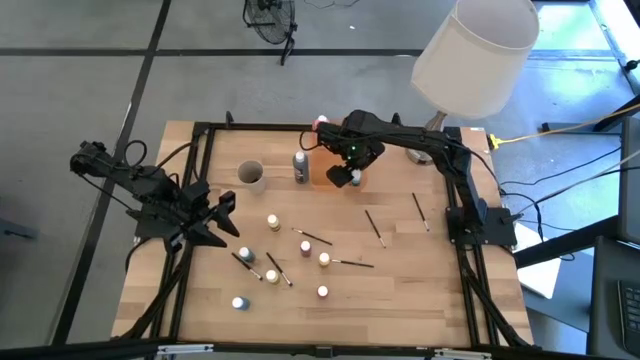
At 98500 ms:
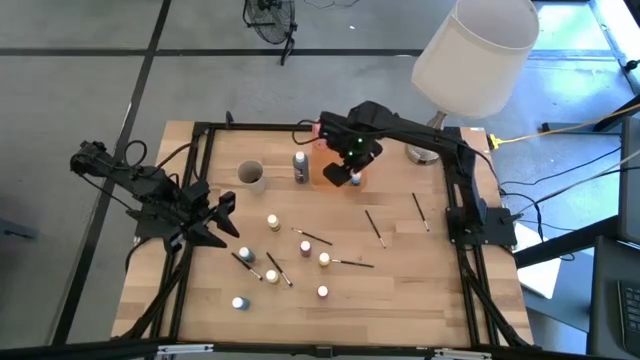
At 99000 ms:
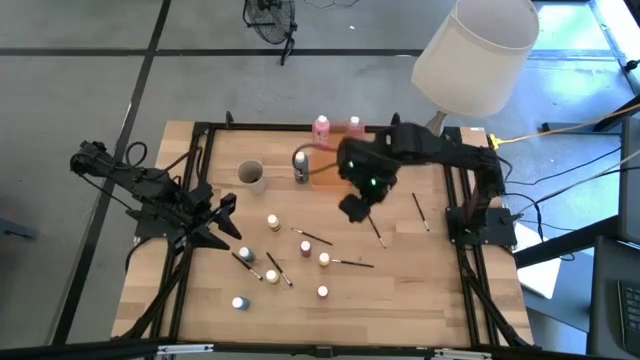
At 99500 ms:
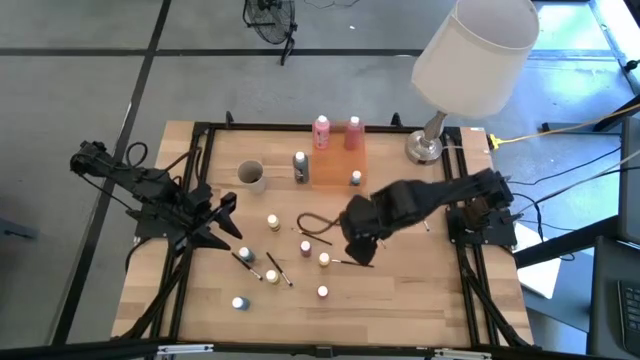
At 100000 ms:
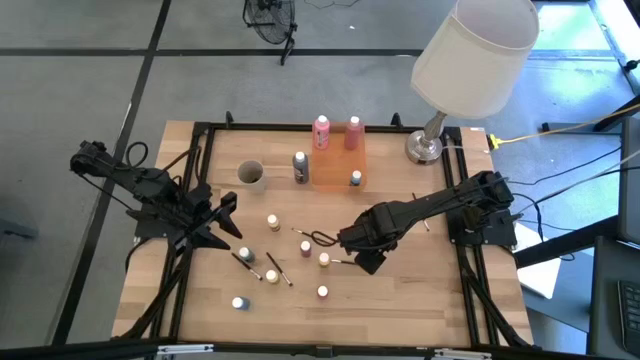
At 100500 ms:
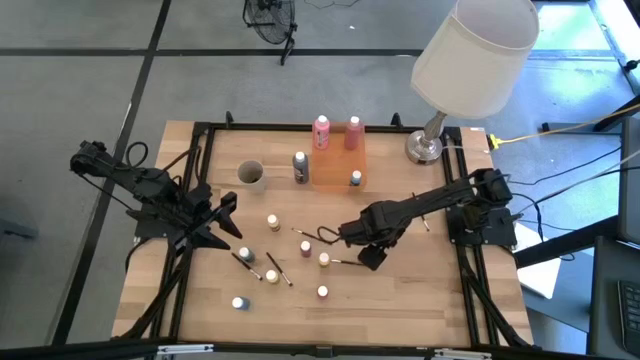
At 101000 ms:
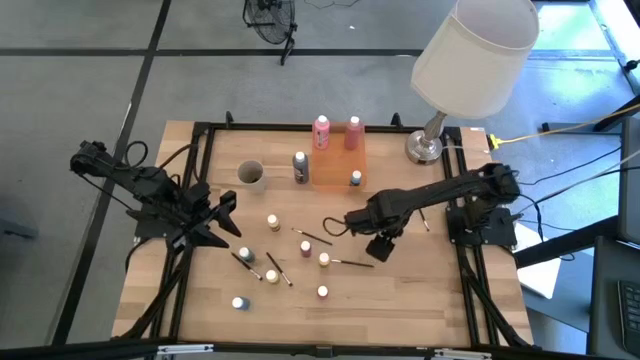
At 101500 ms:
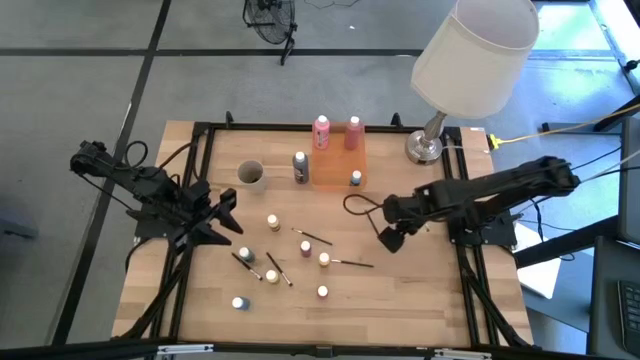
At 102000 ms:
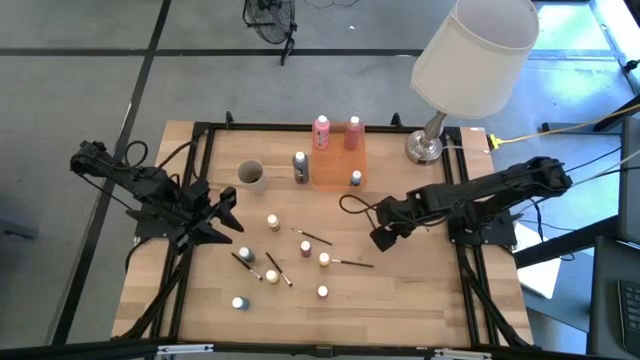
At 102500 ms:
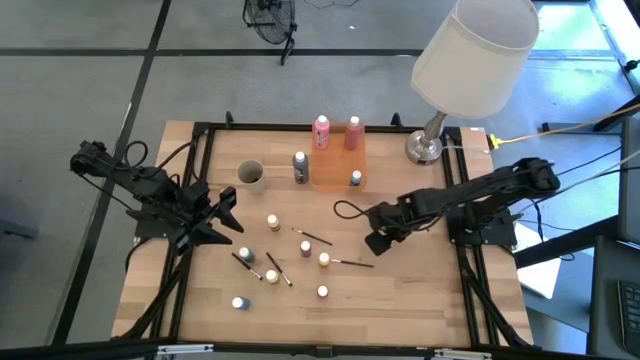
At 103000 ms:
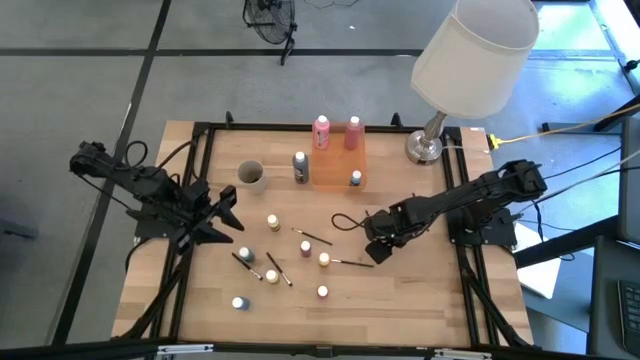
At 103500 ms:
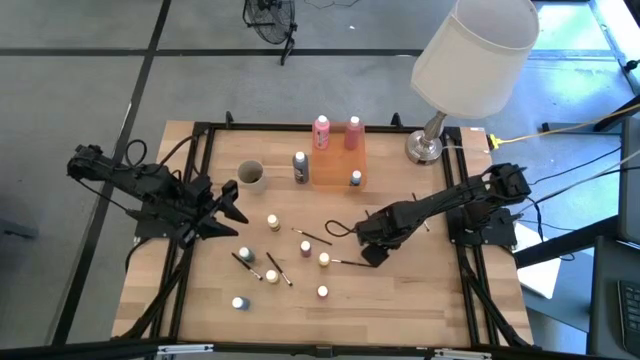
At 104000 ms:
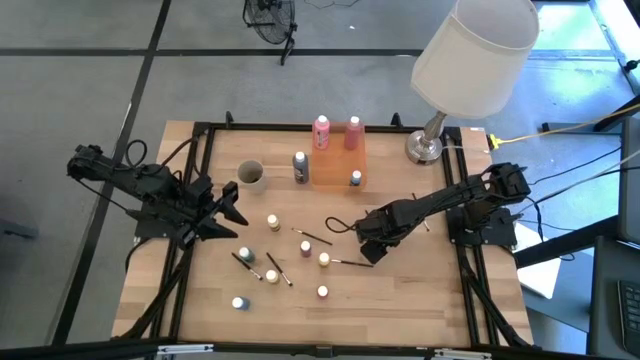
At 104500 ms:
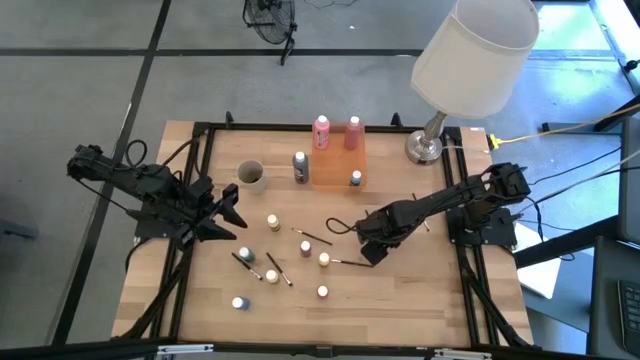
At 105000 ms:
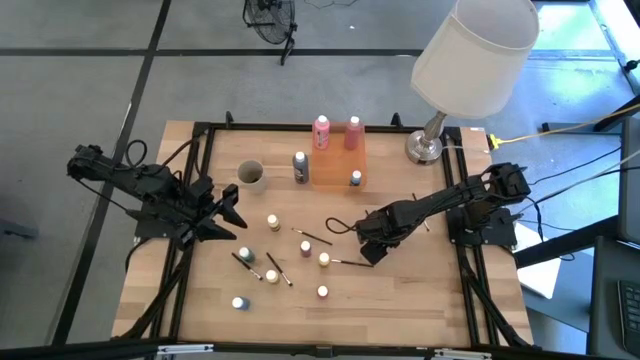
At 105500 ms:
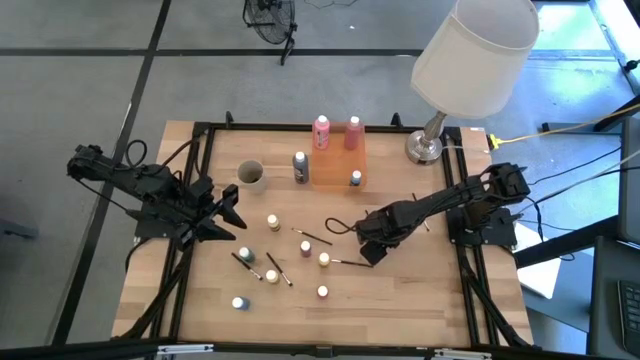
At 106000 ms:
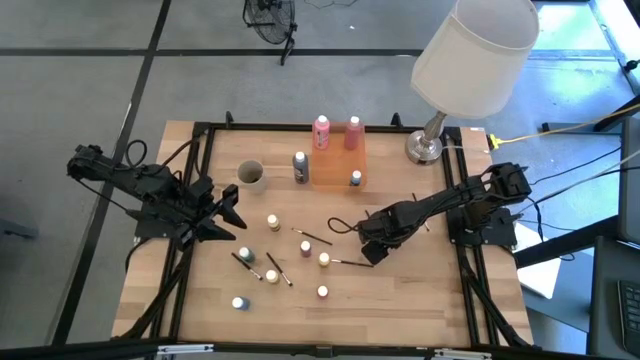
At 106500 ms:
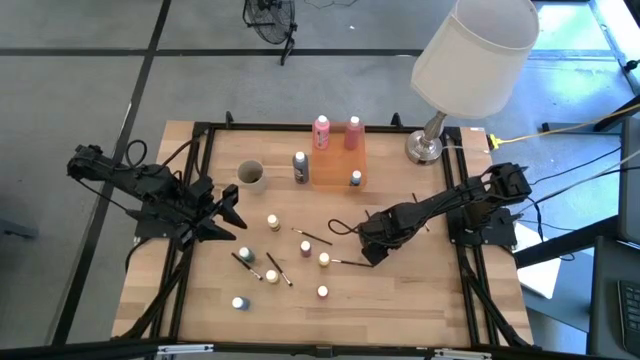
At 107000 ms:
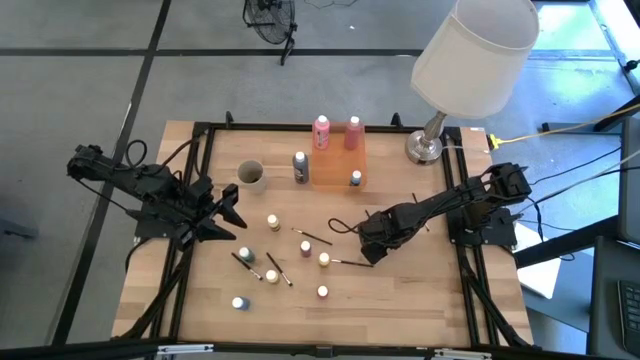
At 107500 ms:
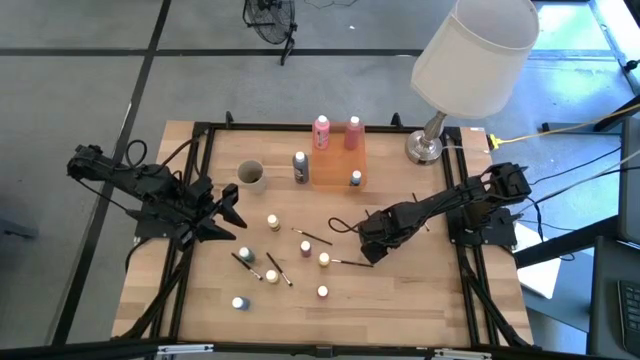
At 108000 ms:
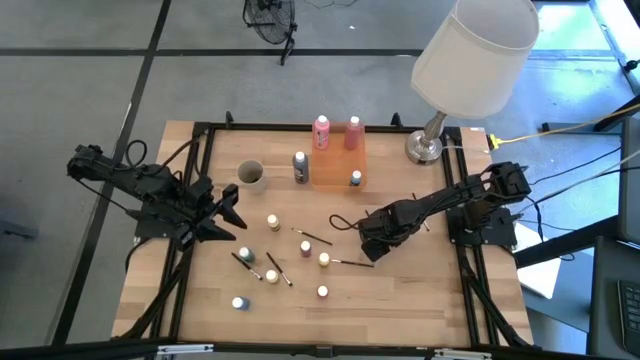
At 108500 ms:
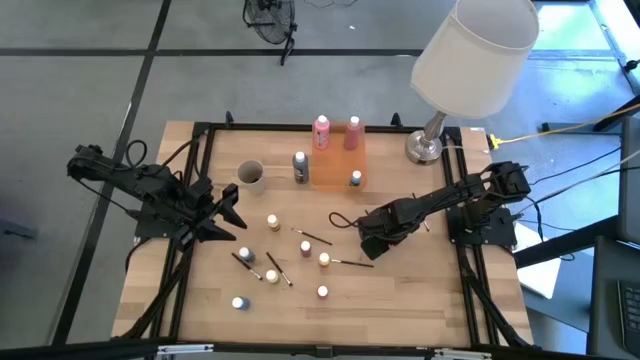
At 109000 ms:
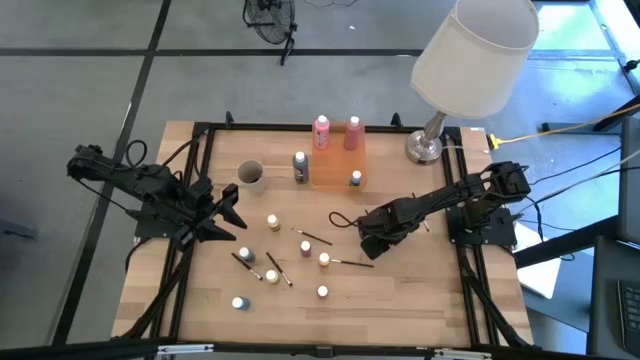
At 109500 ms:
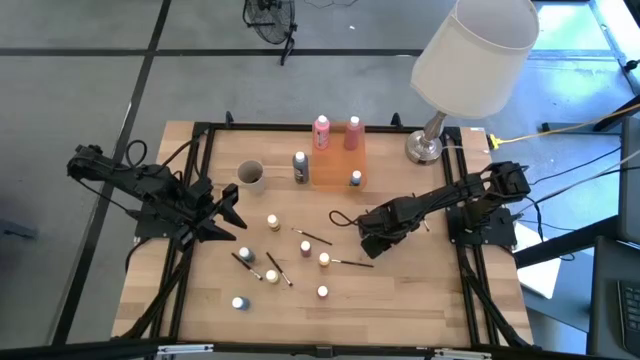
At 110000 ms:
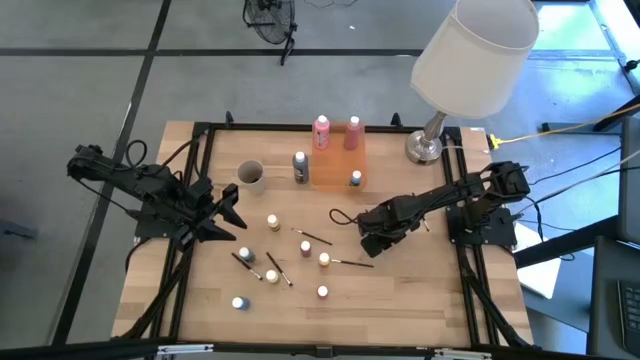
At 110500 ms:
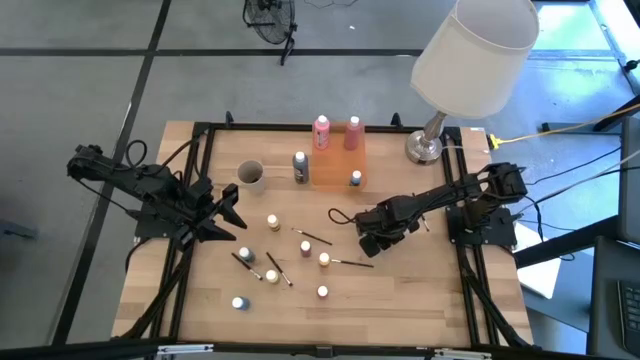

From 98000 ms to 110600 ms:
Task: Pick & Place Paint Supplies
Put the silver paint brush into the white cup

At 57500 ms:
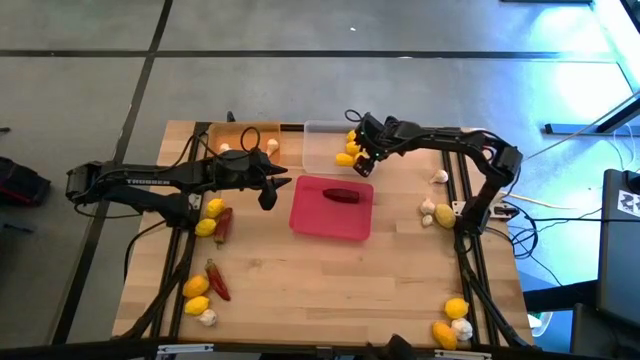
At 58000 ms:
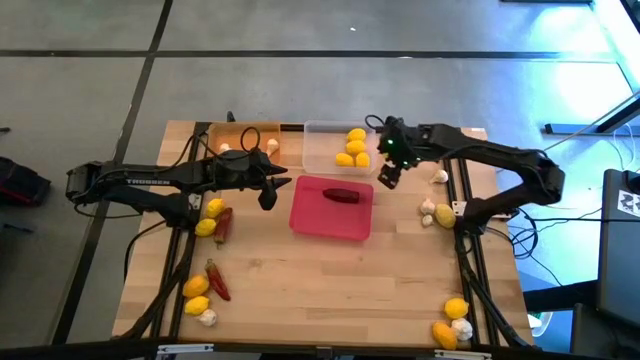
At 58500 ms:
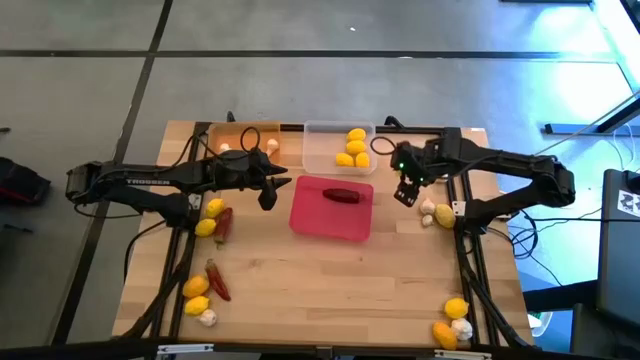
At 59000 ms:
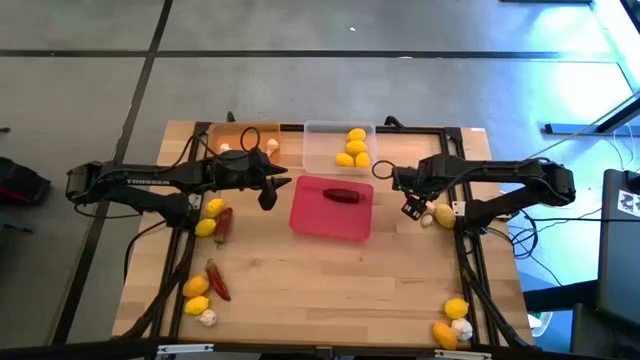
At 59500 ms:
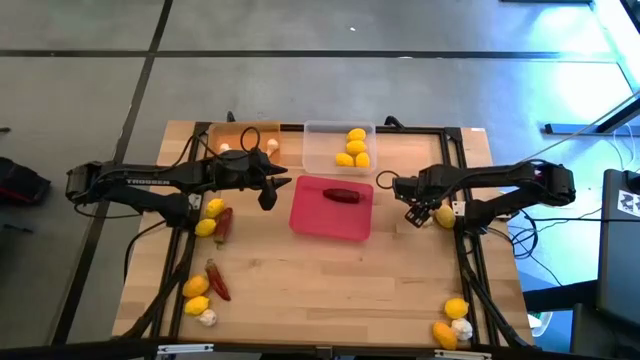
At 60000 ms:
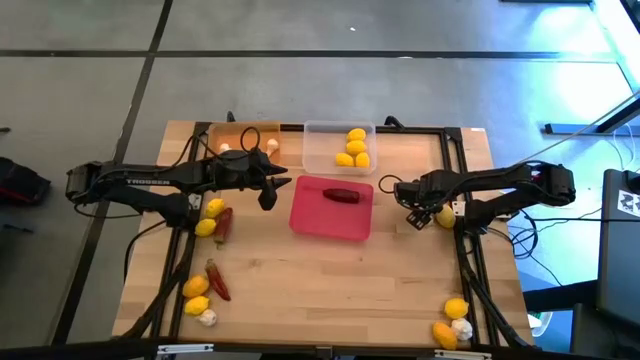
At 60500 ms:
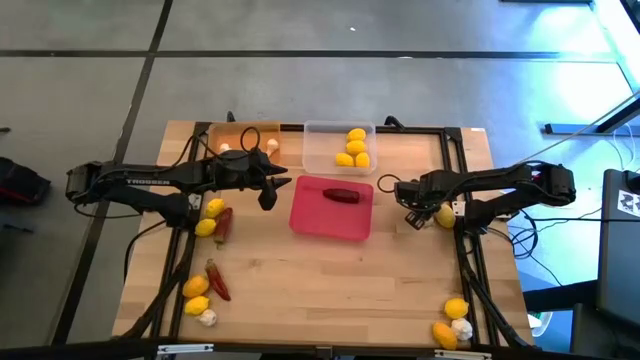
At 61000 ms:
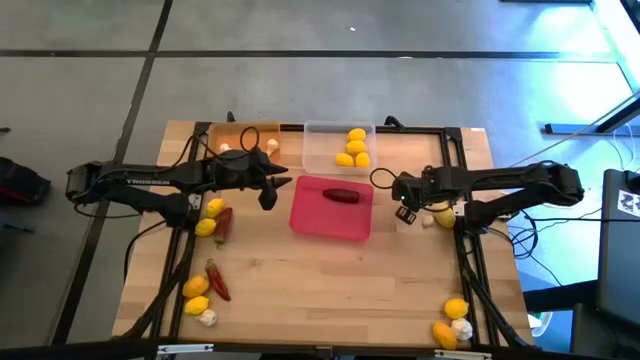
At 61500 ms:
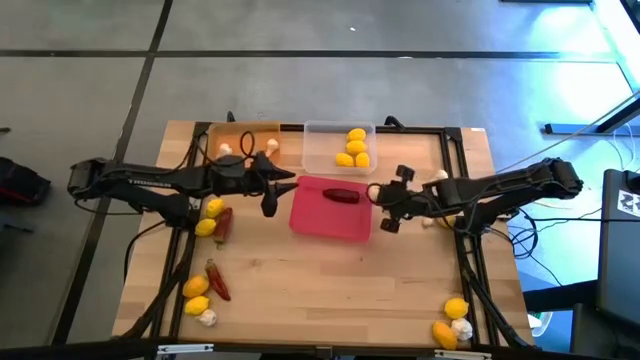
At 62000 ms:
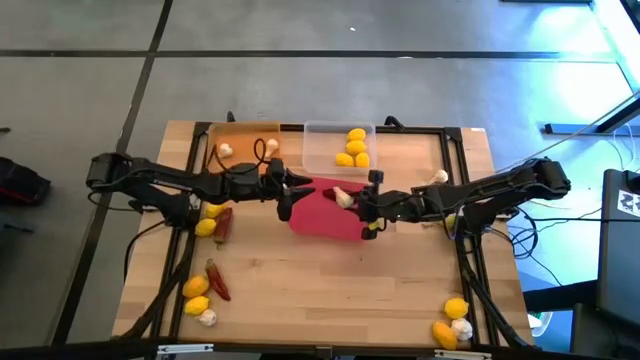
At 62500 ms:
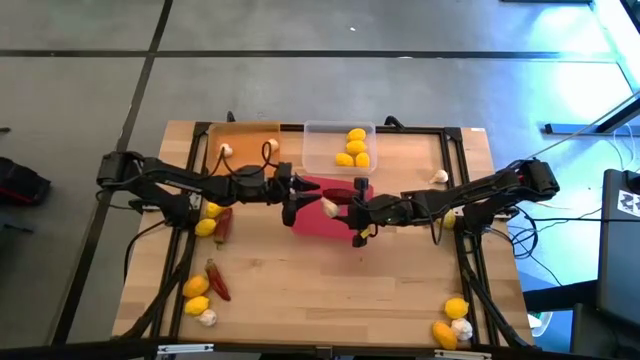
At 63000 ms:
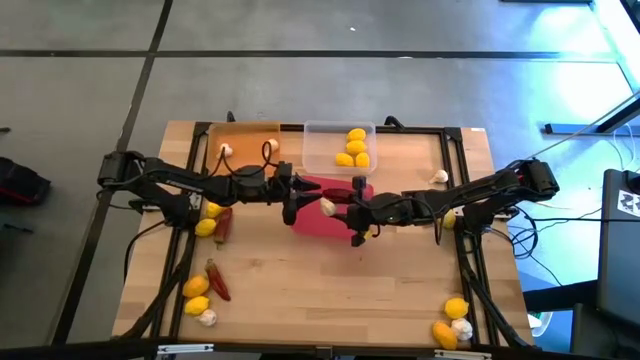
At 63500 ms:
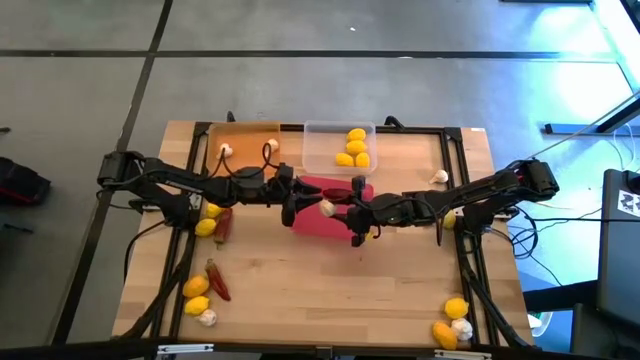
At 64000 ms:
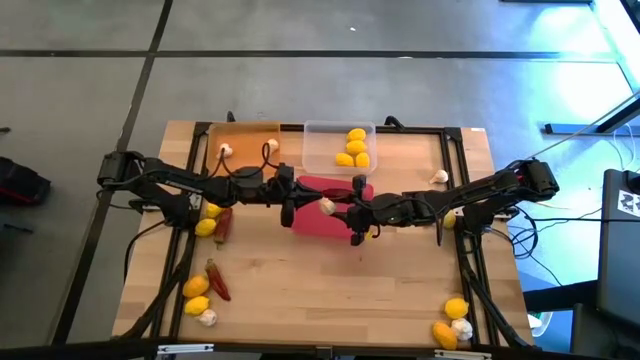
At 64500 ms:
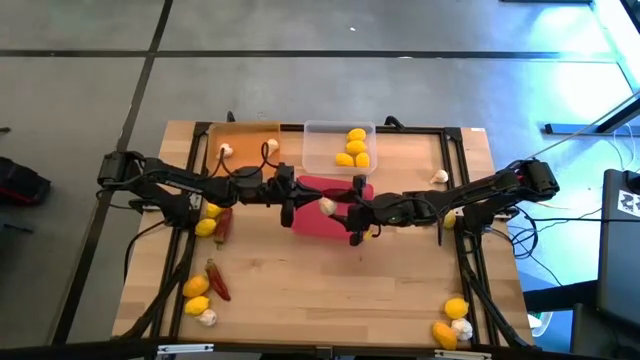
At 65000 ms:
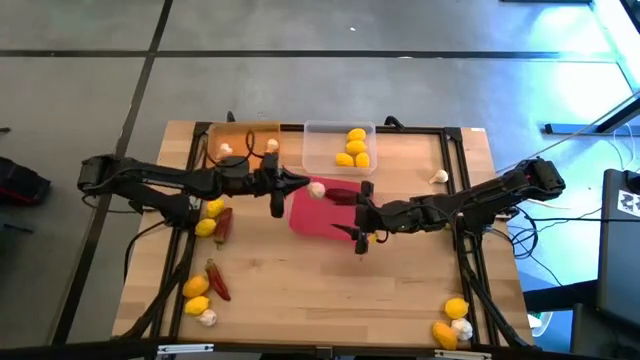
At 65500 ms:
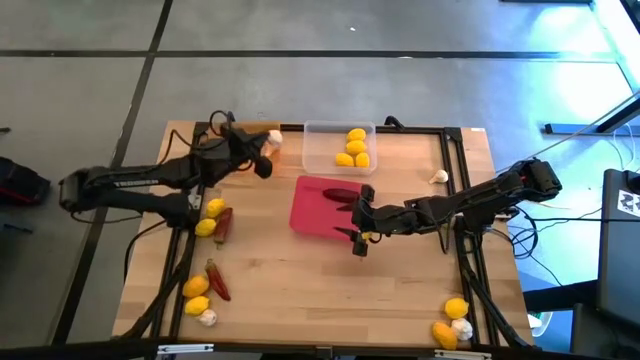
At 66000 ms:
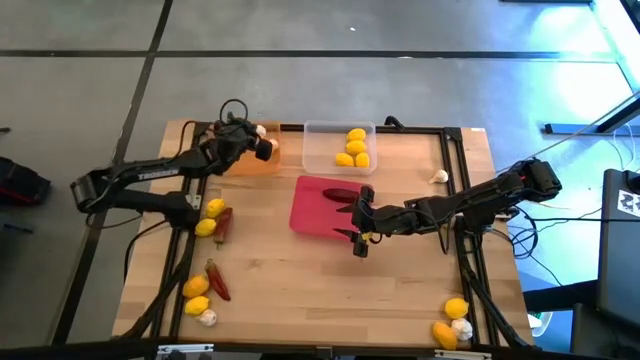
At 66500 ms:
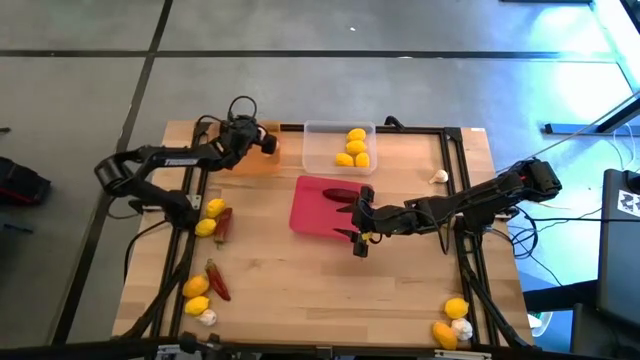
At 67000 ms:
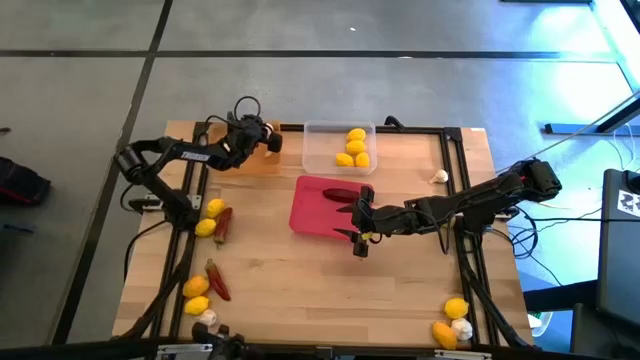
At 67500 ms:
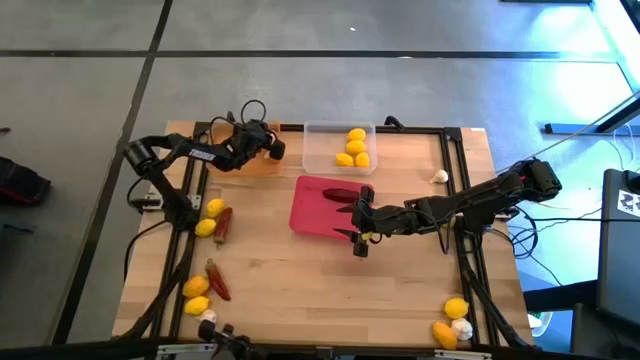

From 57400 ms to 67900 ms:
Task: Sort produce into baskets
Put the white garlic in the orange bin
